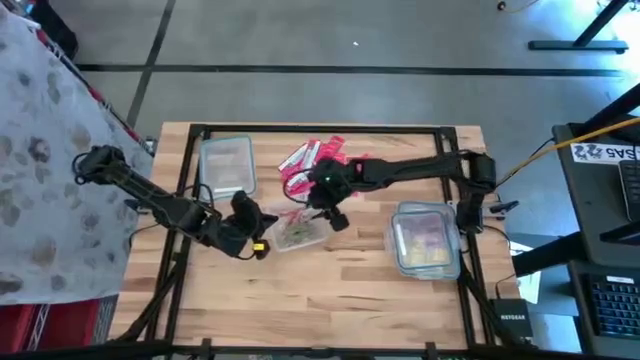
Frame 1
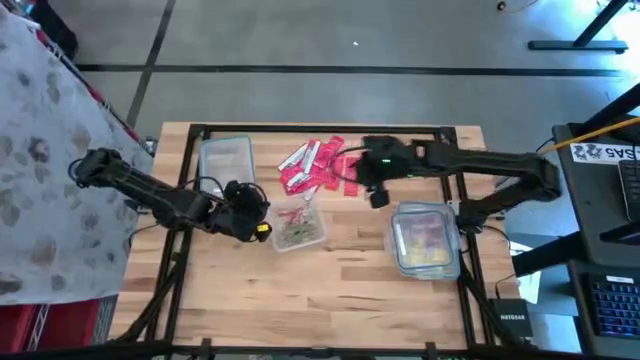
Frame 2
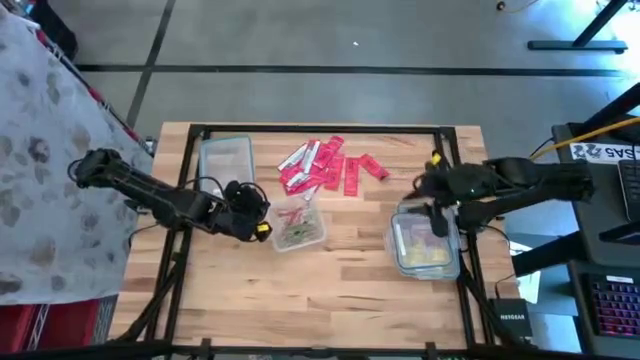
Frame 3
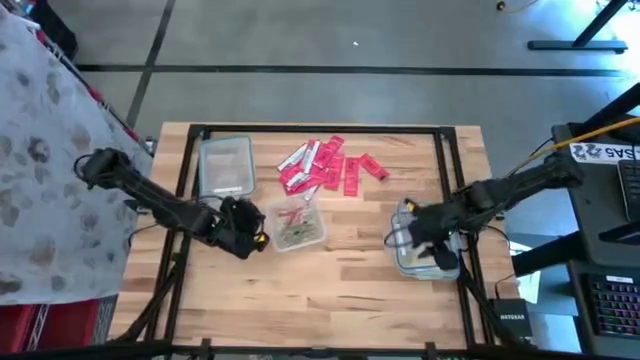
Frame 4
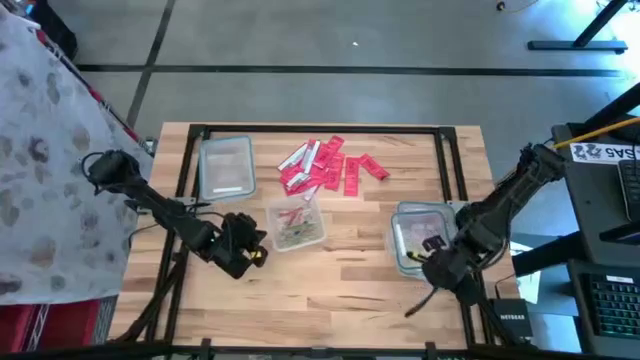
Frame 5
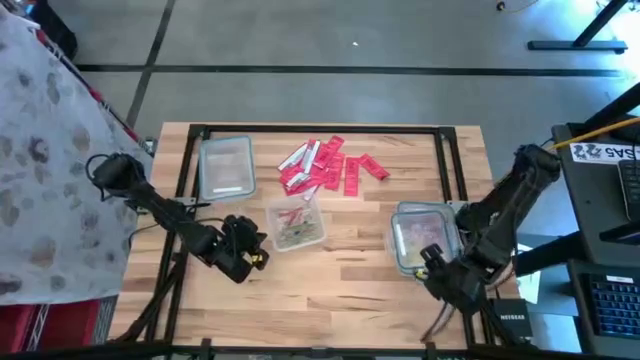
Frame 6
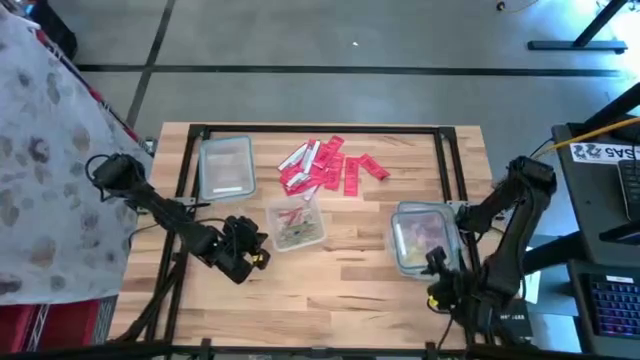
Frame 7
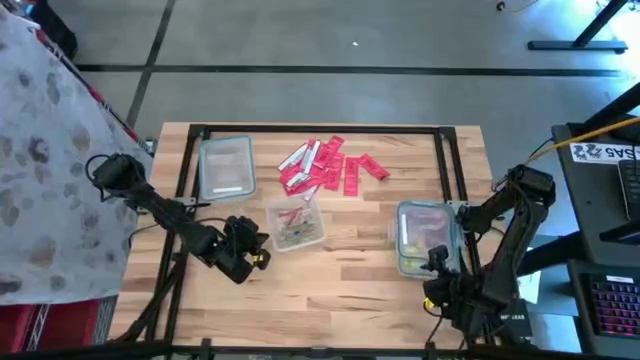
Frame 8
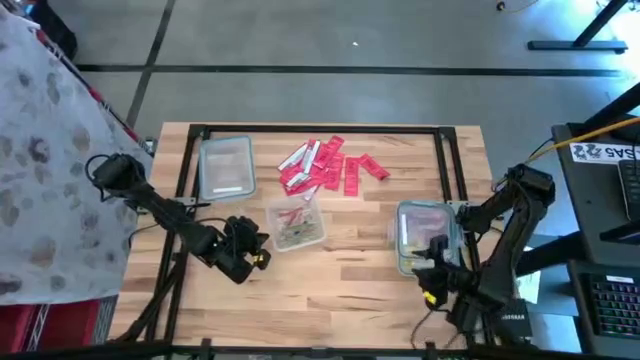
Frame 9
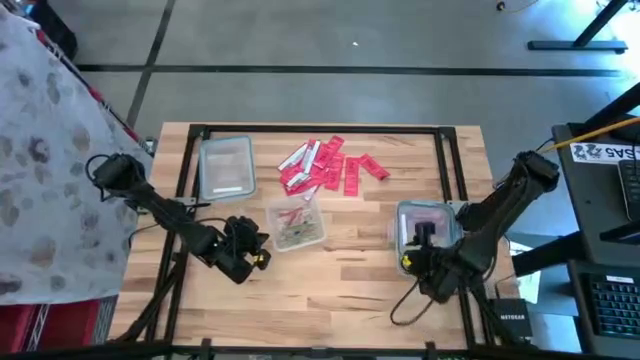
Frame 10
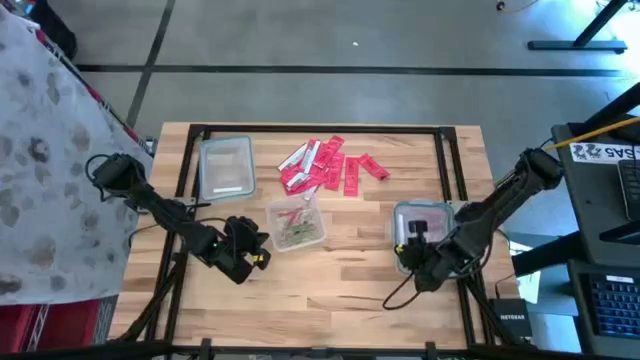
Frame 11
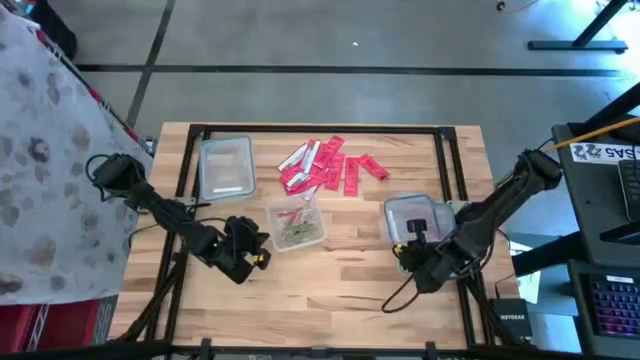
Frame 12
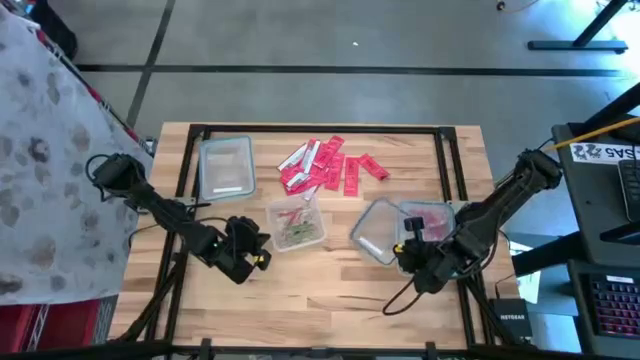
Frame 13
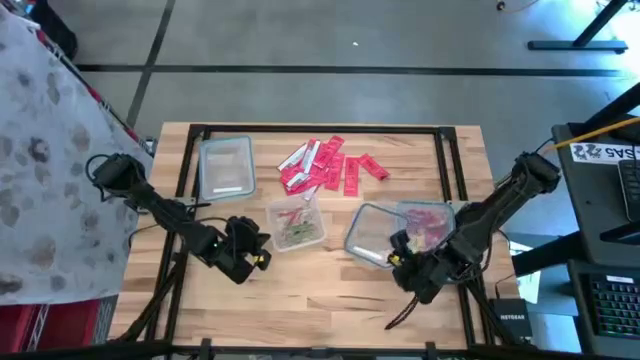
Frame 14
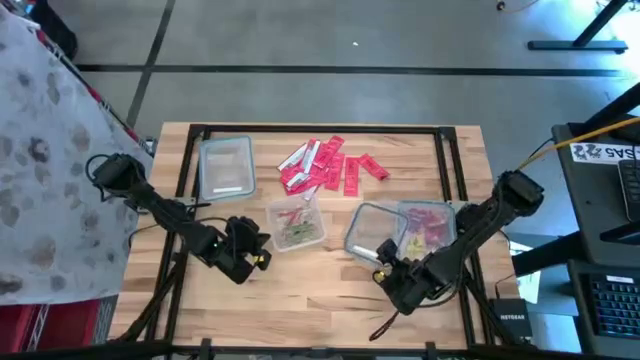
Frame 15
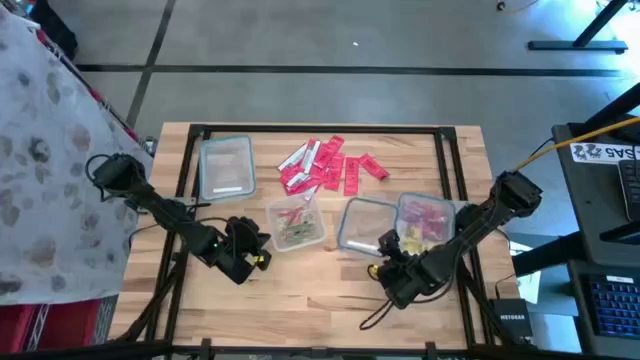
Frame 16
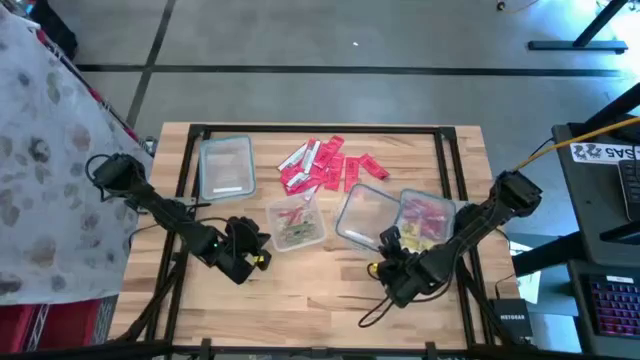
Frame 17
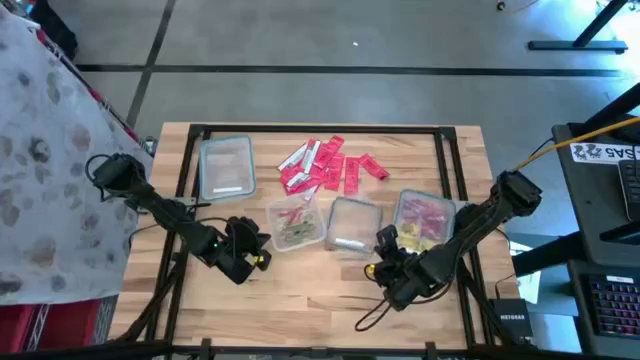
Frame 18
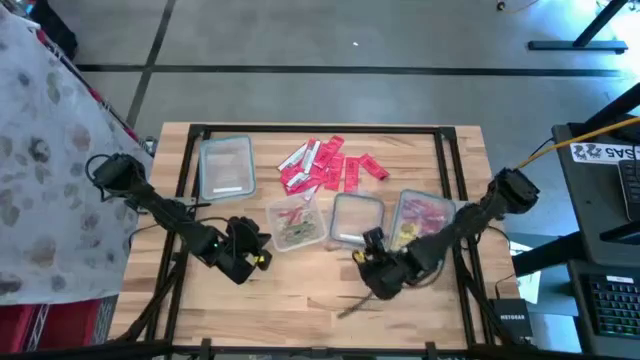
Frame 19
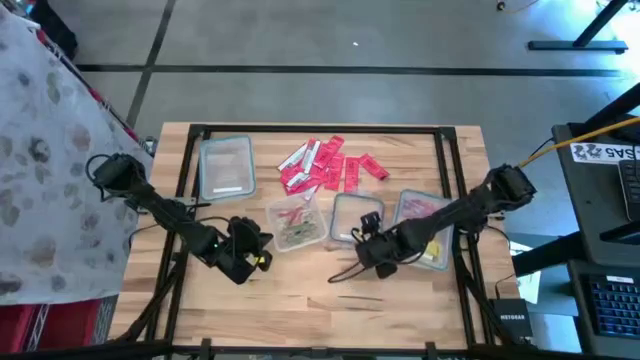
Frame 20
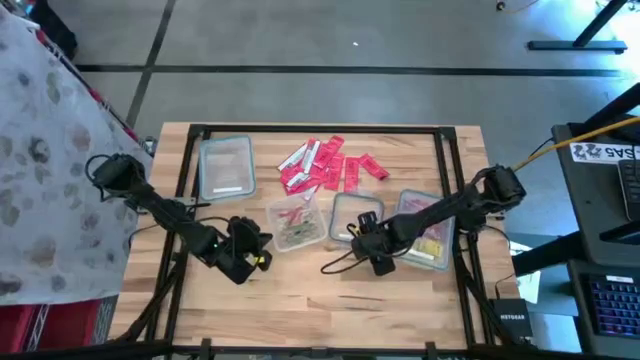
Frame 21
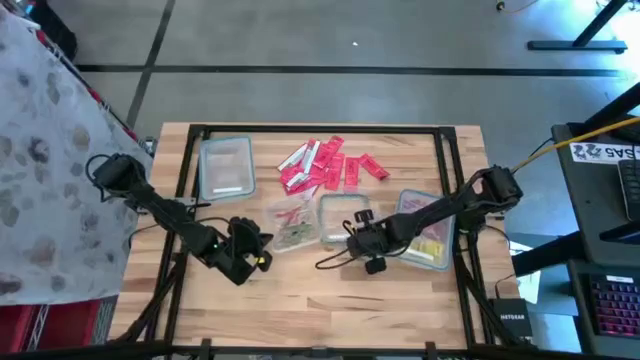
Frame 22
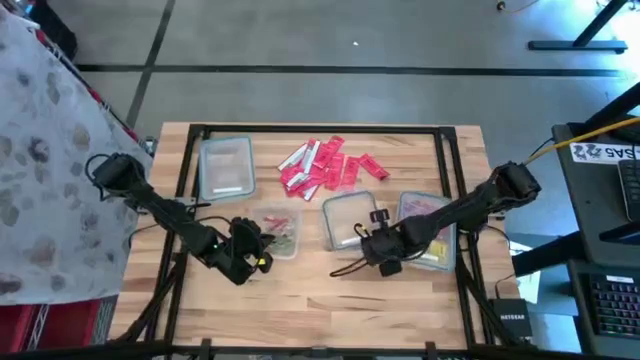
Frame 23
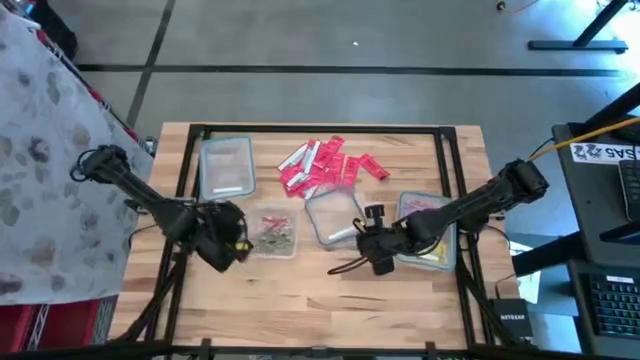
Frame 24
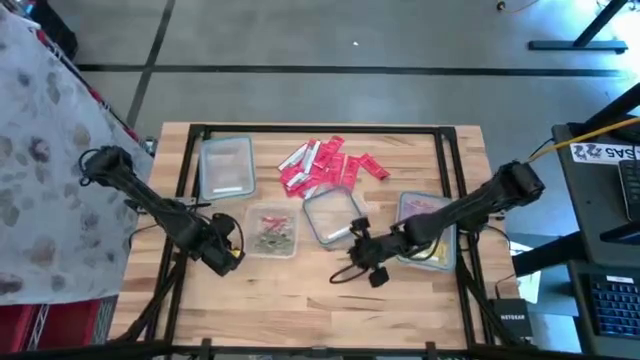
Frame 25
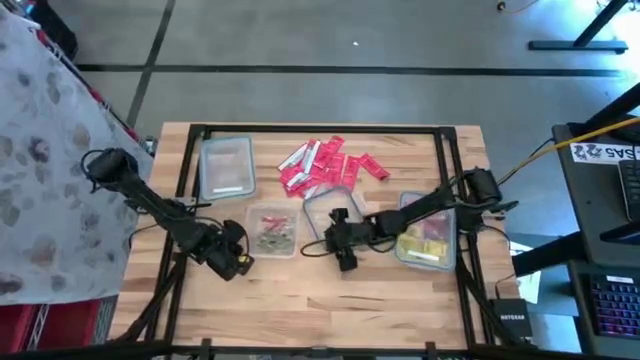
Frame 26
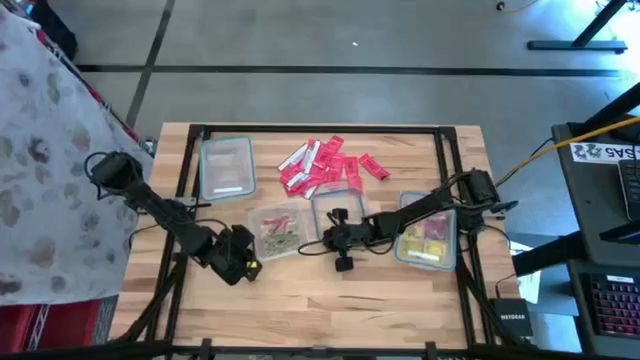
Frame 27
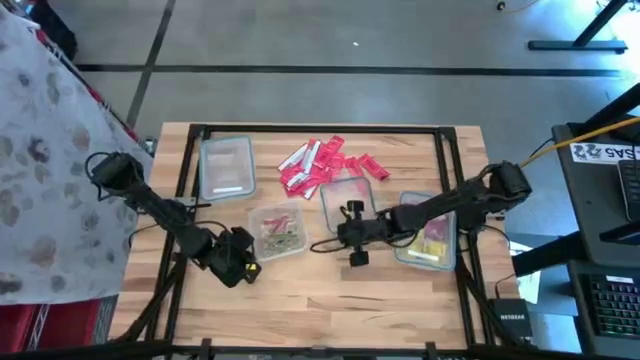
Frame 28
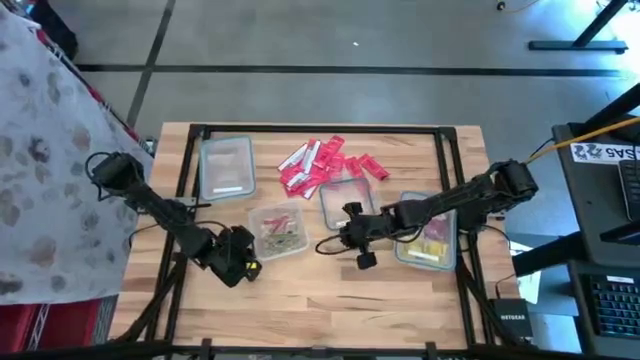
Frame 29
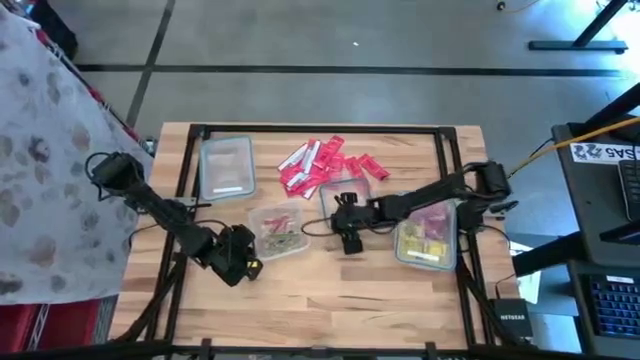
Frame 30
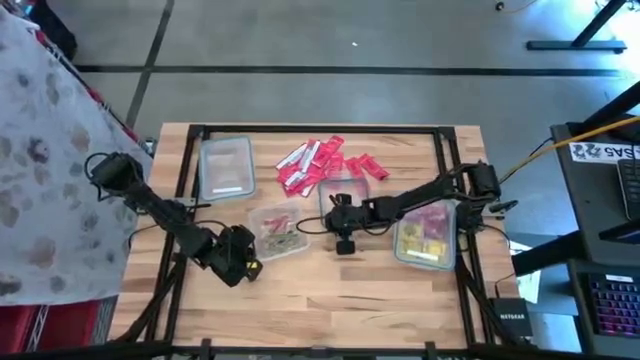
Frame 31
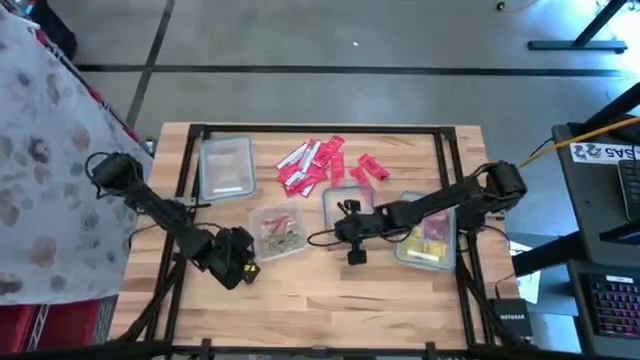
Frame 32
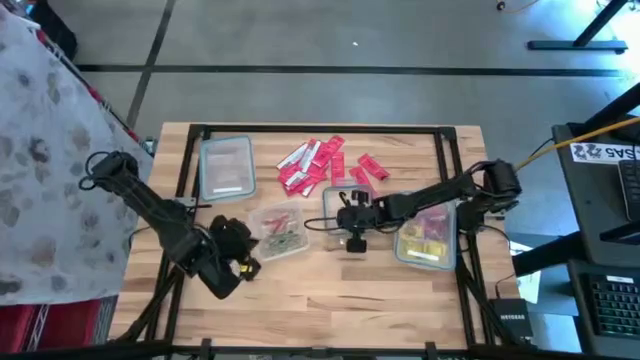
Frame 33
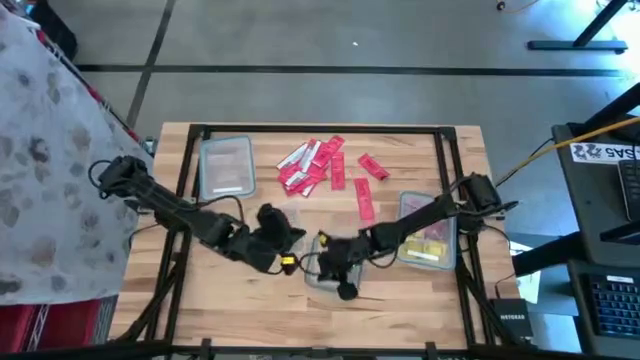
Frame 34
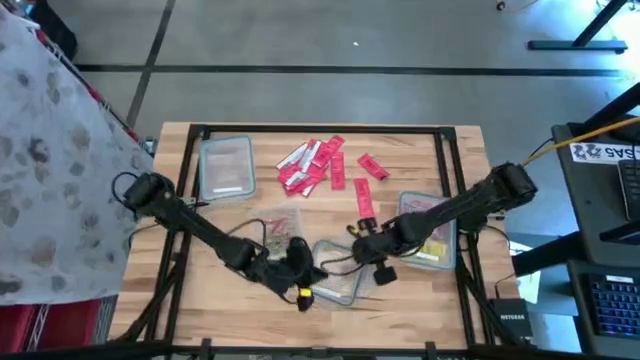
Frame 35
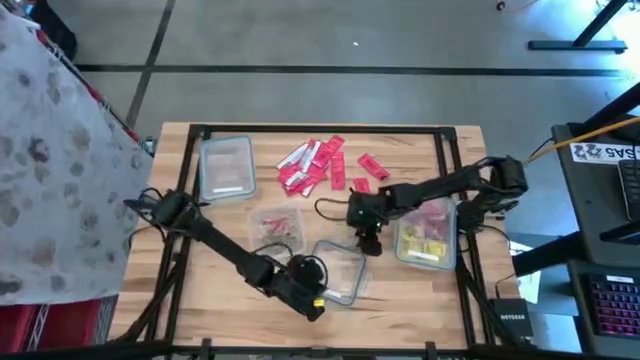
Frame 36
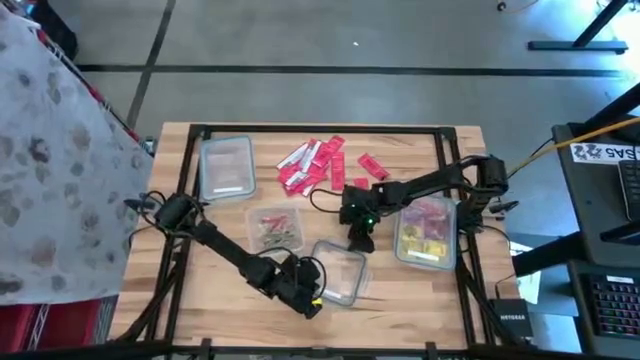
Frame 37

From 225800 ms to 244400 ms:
Task: Sort candy
Close the square transparent bin

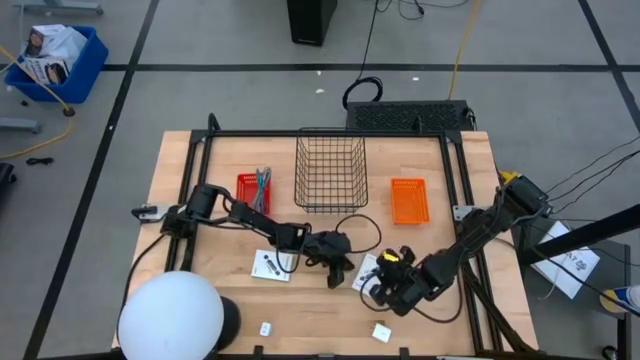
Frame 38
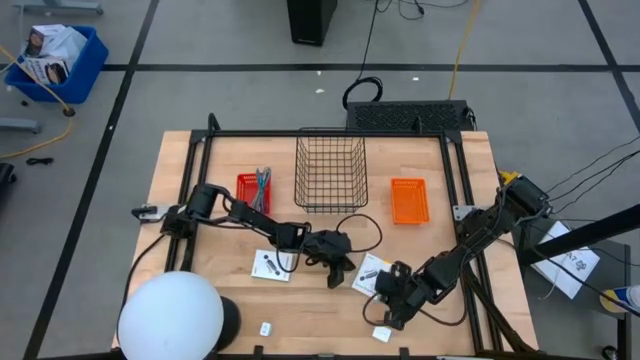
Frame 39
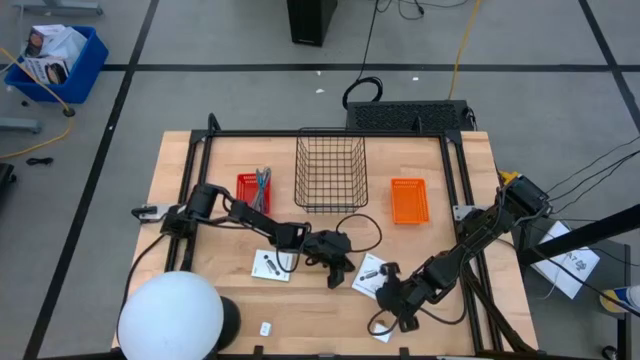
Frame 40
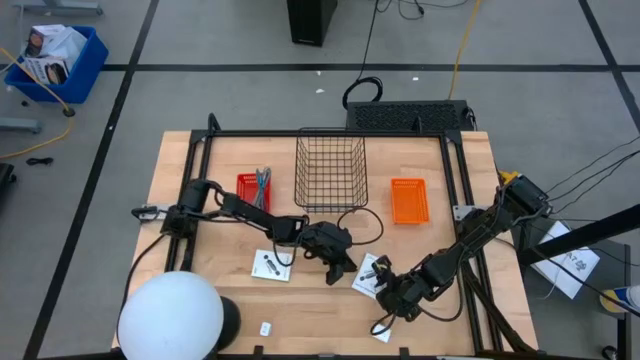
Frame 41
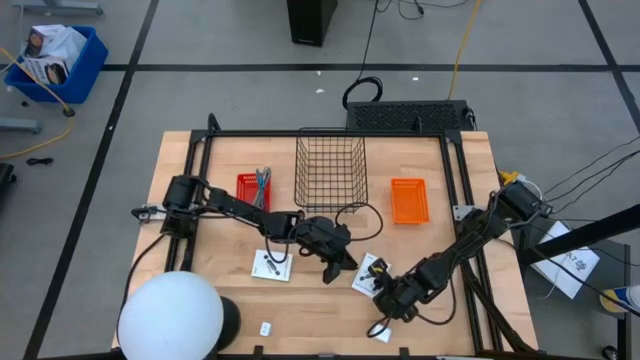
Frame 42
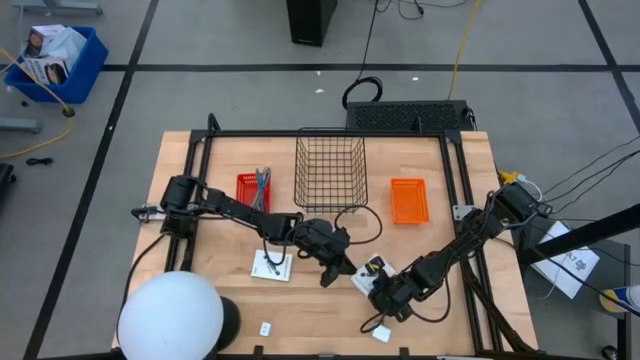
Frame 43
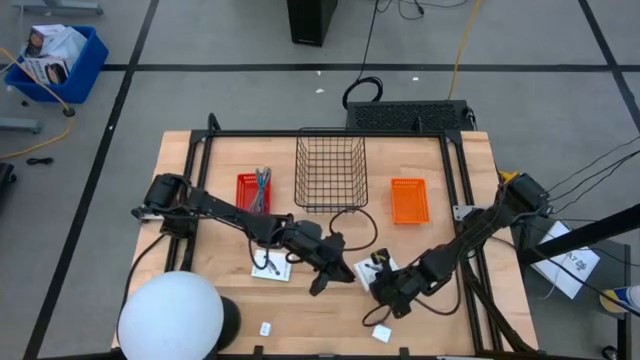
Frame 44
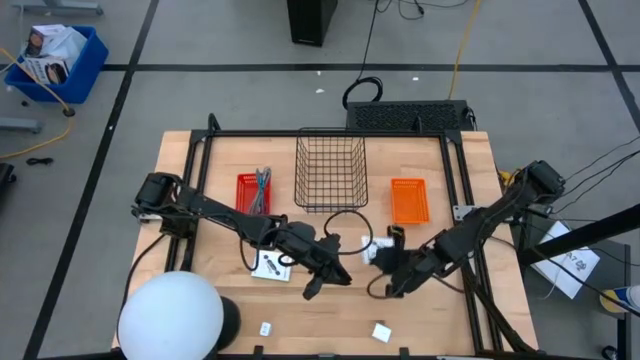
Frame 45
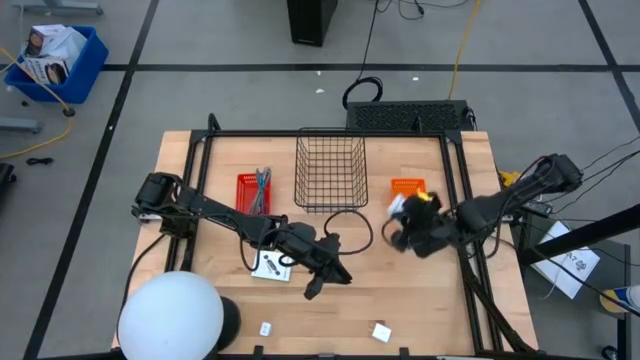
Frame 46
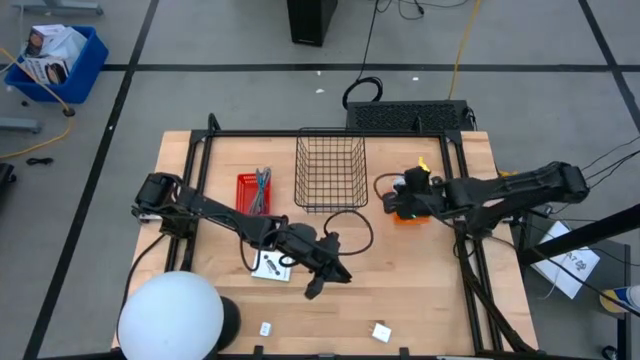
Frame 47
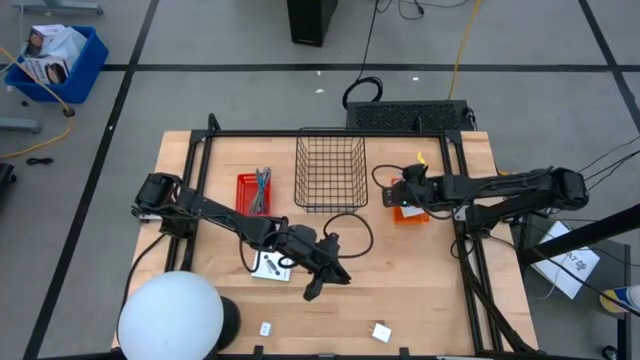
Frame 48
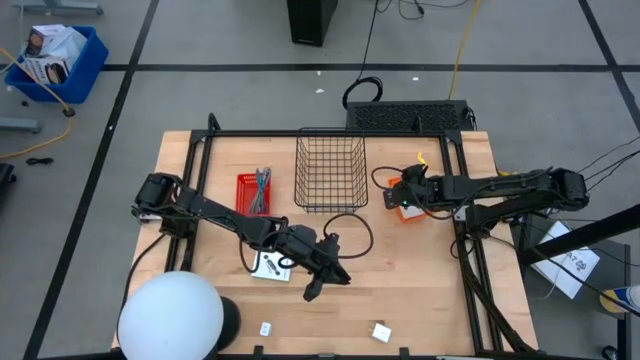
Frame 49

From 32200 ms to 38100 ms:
Task: Pick and place items into bin
Put the right card reader box into the orange basket
